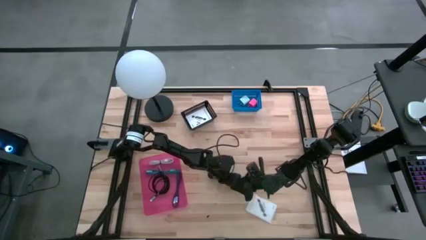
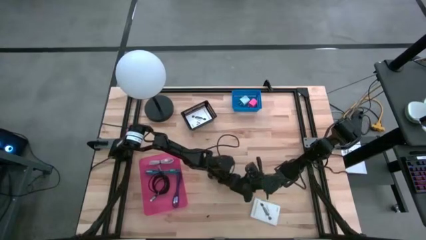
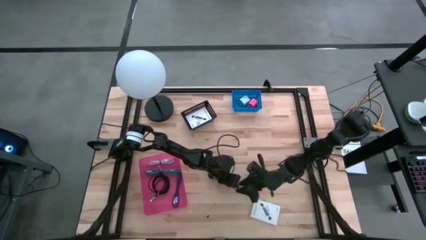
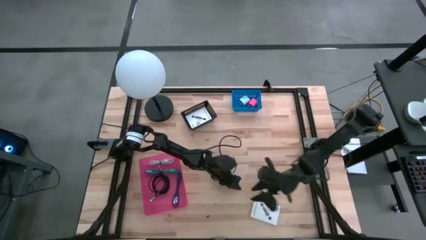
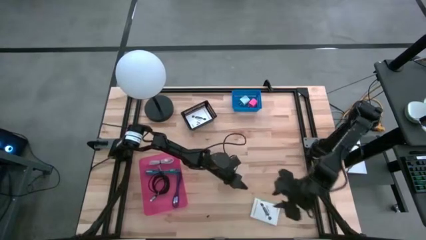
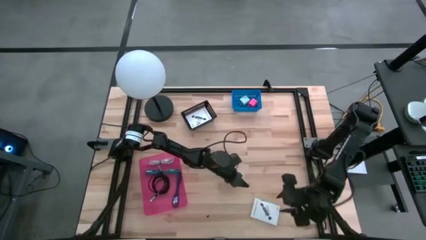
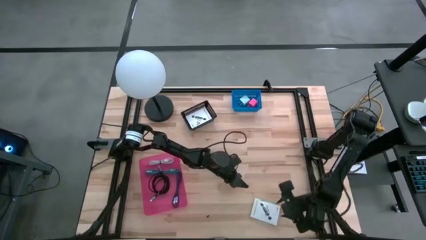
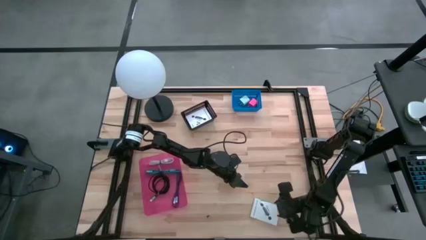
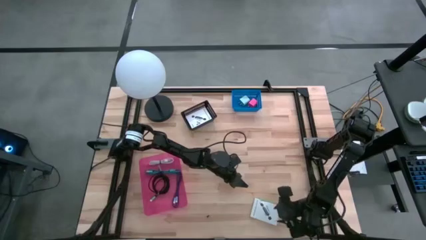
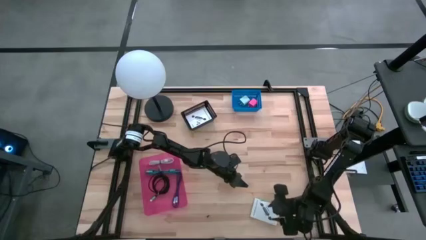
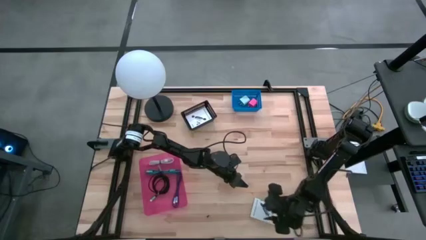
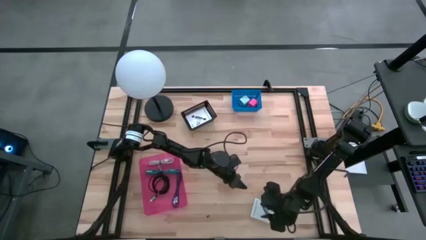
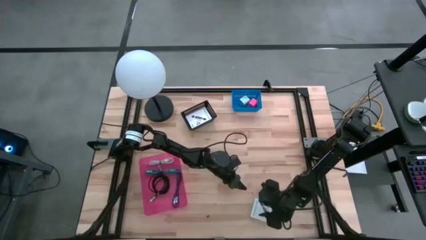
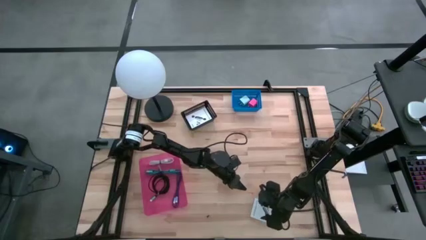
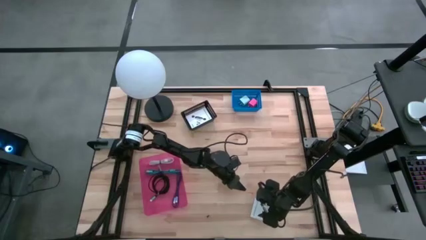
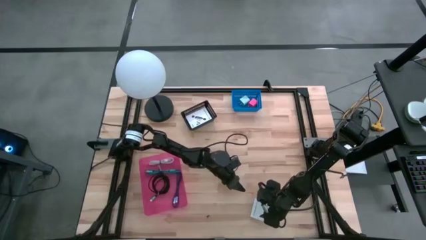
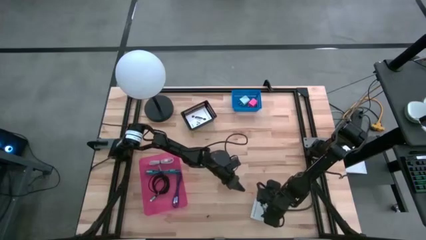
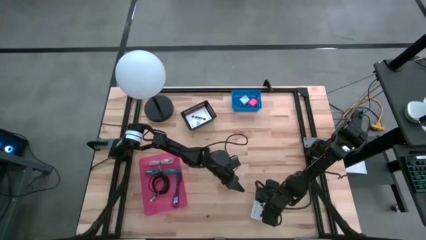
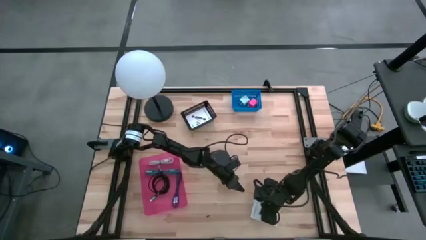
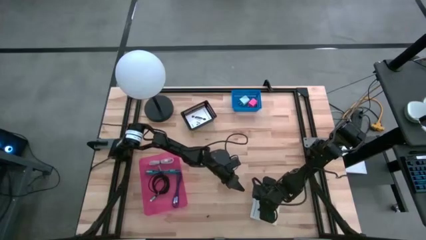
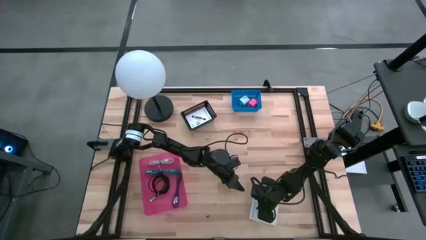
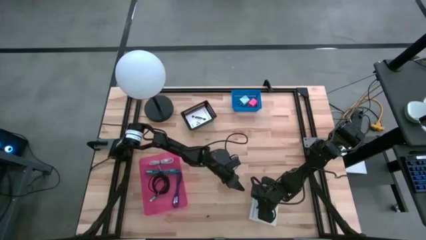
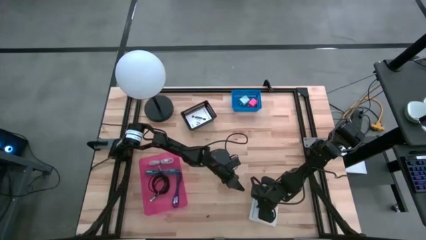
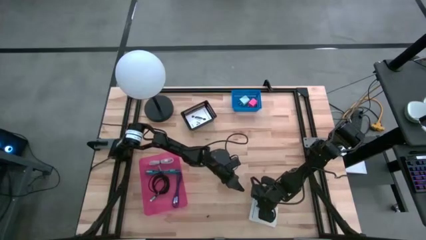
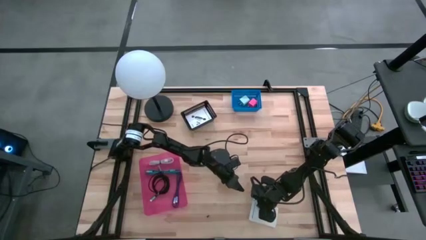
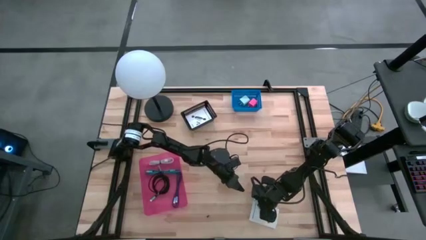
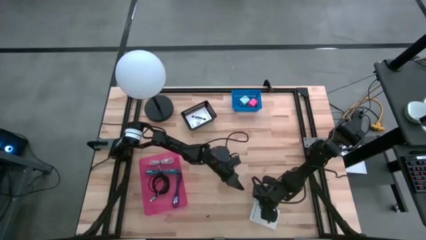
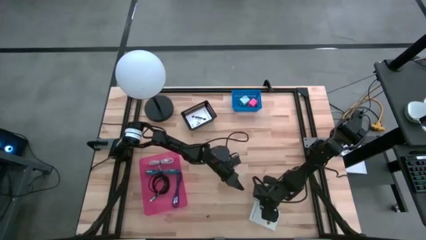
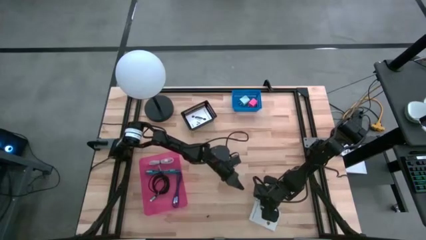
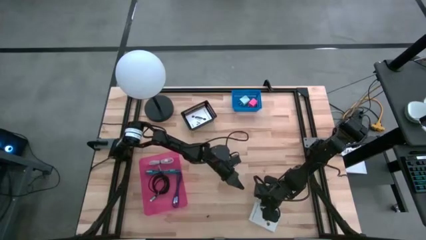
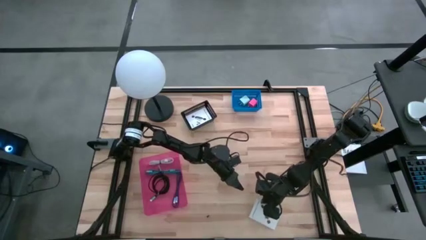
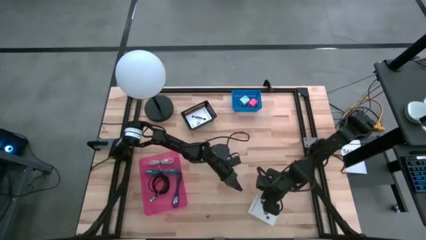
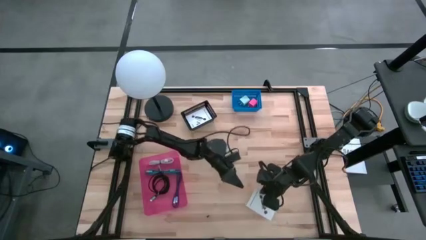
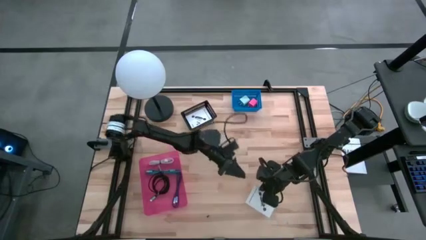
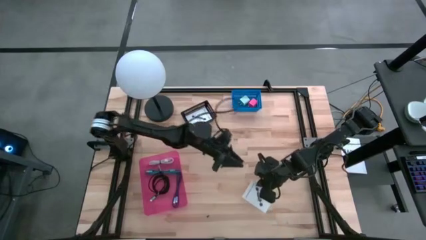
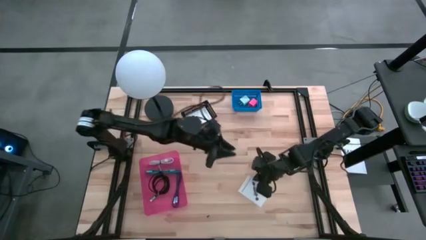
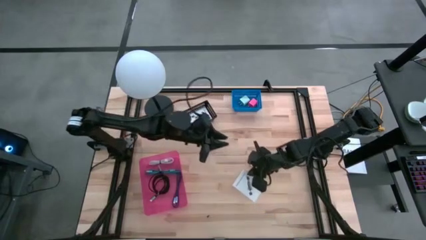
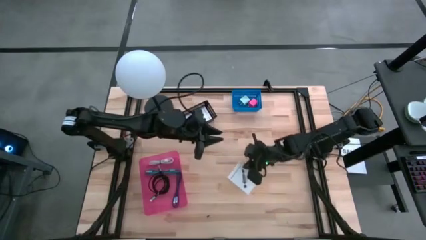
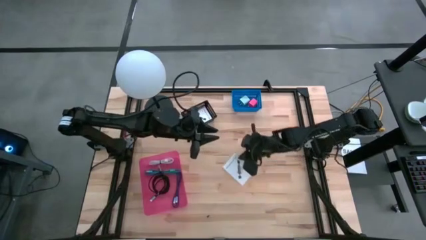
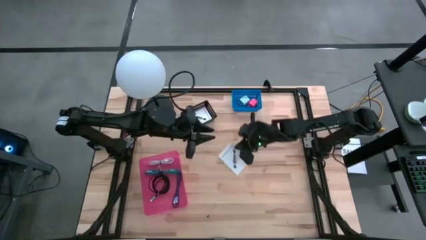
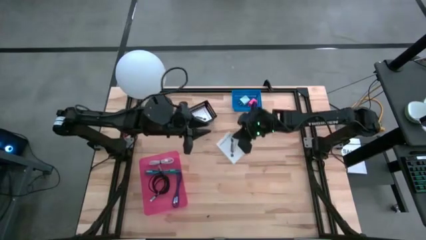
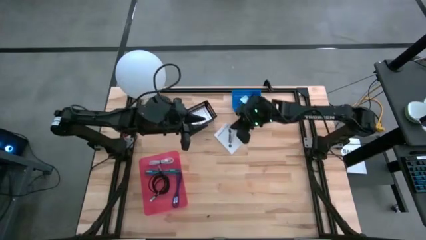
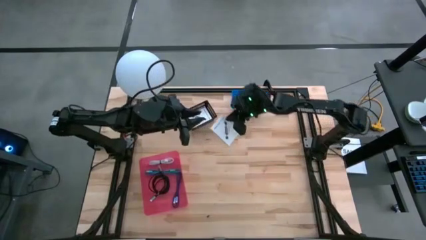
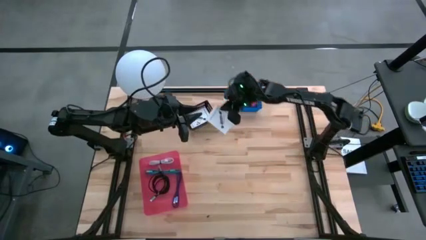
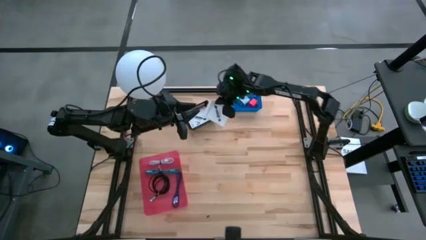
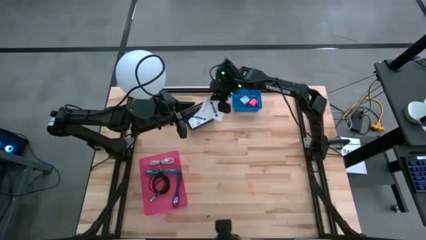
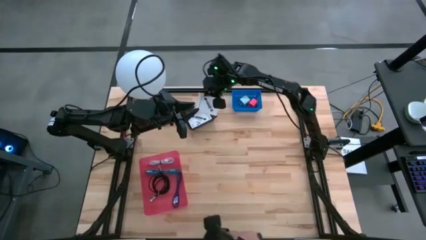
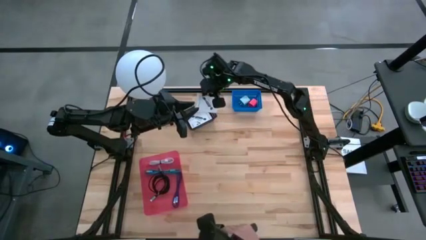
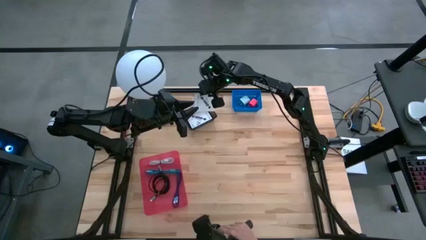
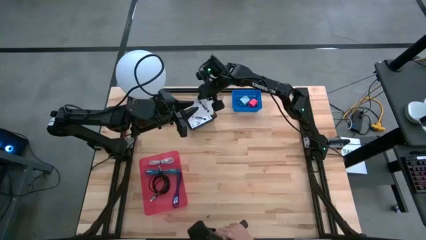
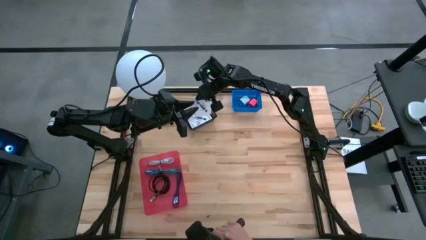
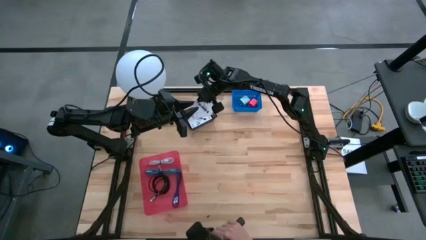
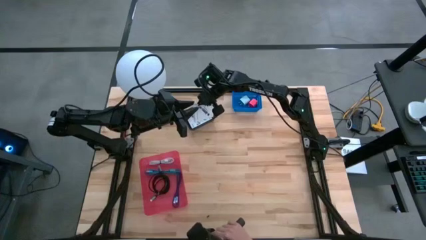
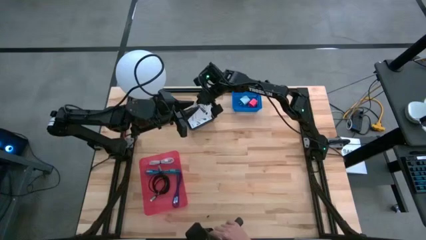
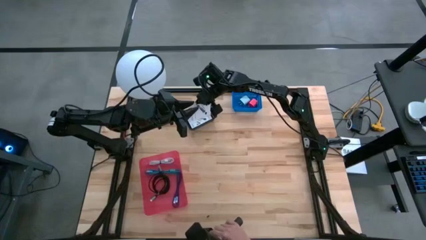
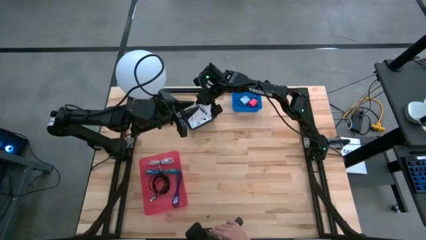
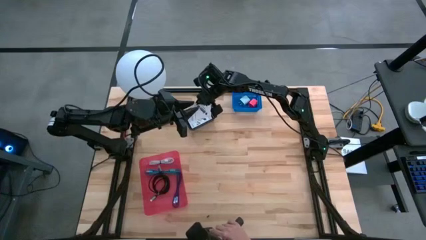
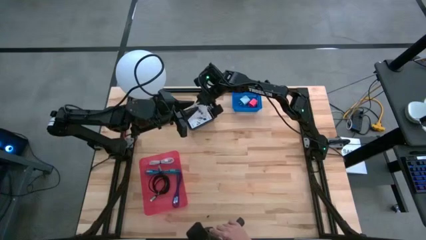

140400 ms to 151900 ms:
Task: Pick and place items into bin
Put the card reader box into the black bin
